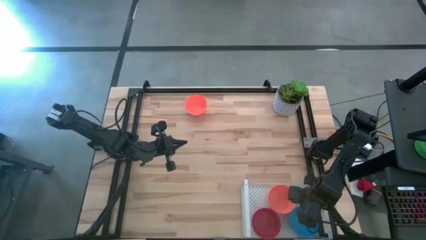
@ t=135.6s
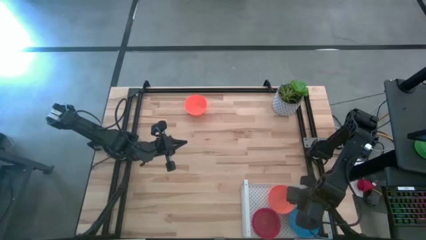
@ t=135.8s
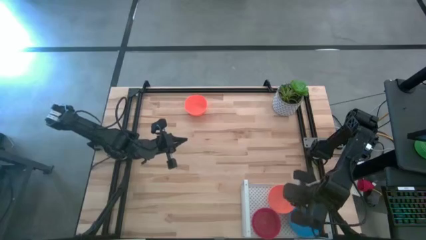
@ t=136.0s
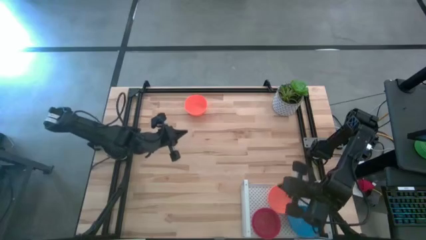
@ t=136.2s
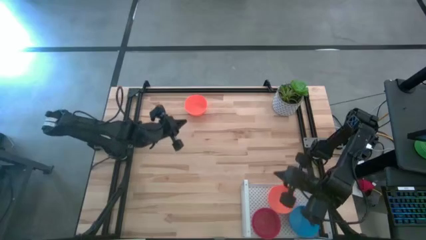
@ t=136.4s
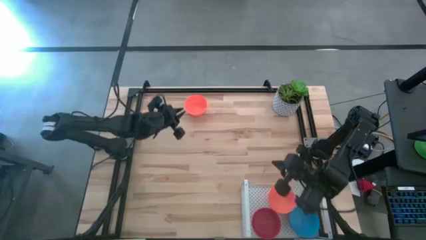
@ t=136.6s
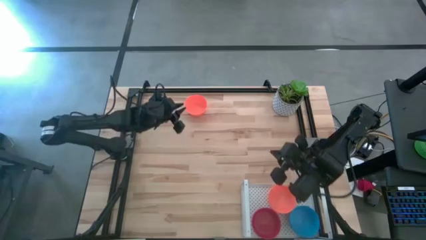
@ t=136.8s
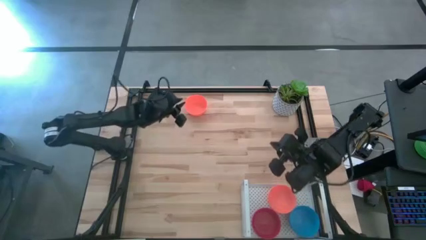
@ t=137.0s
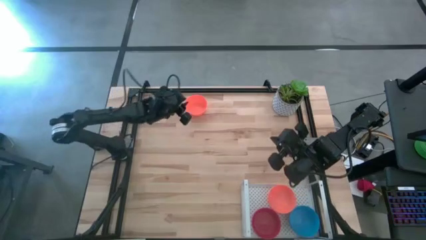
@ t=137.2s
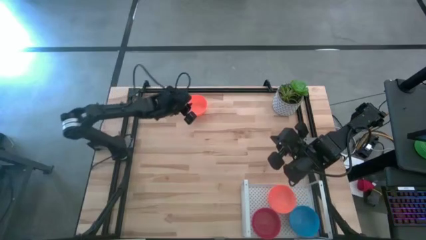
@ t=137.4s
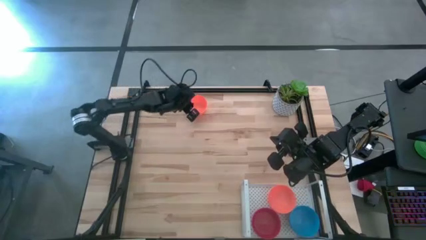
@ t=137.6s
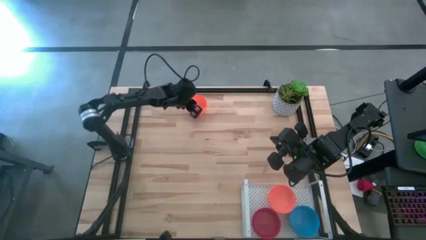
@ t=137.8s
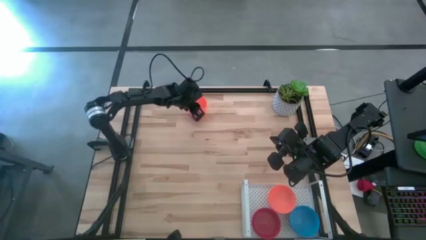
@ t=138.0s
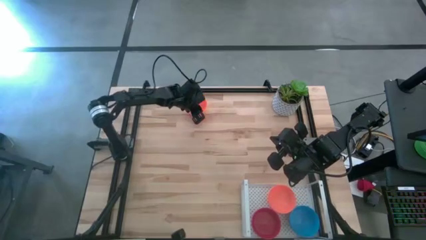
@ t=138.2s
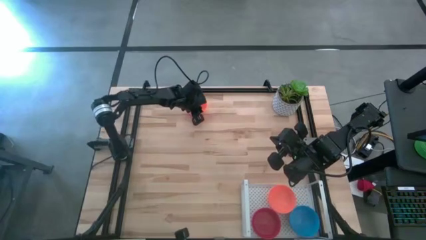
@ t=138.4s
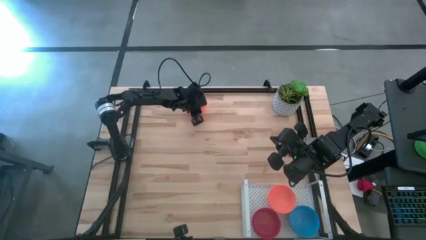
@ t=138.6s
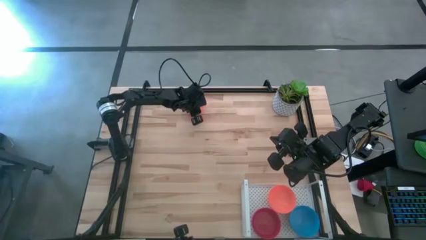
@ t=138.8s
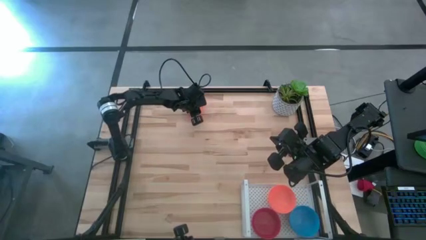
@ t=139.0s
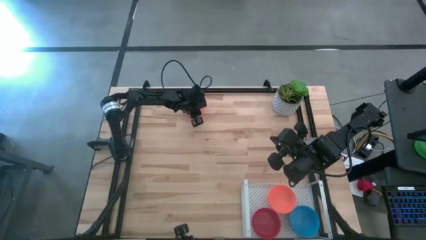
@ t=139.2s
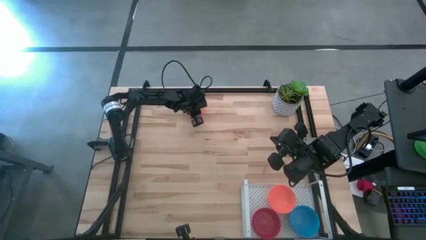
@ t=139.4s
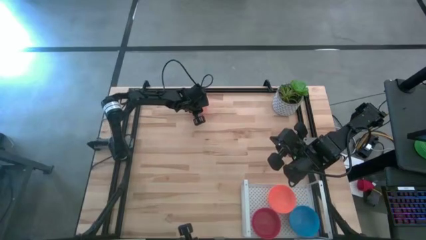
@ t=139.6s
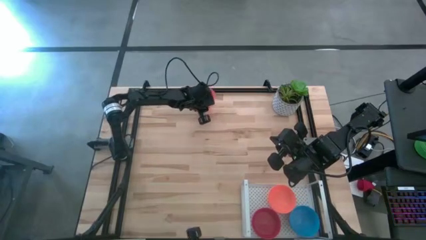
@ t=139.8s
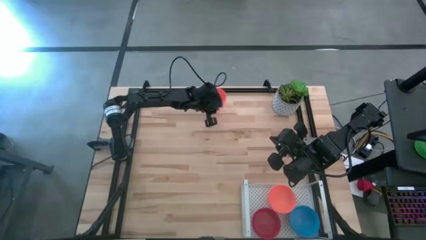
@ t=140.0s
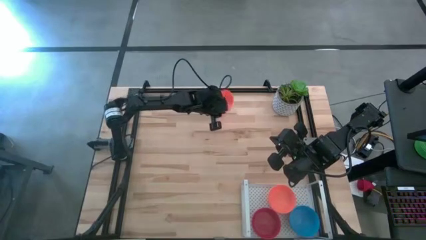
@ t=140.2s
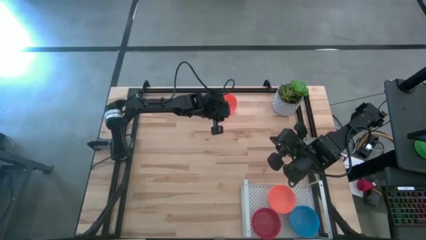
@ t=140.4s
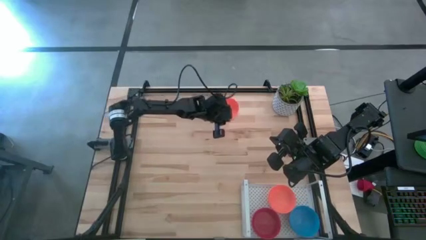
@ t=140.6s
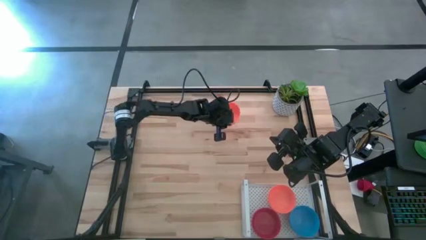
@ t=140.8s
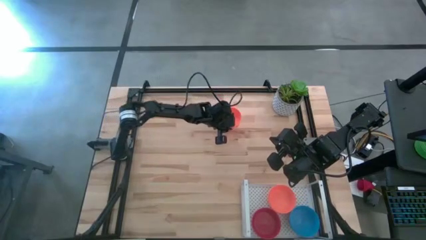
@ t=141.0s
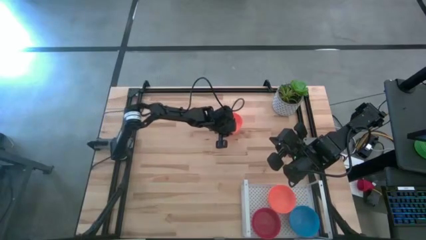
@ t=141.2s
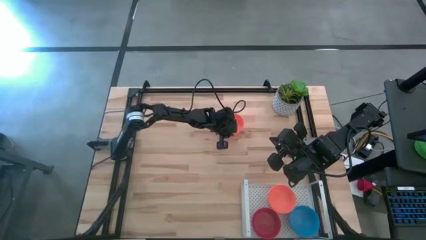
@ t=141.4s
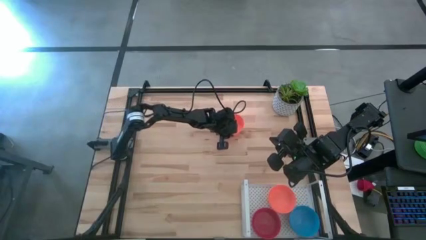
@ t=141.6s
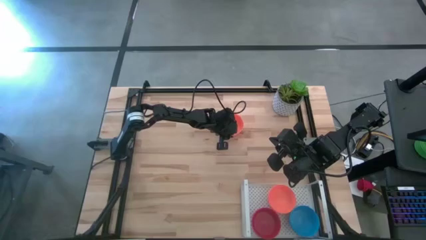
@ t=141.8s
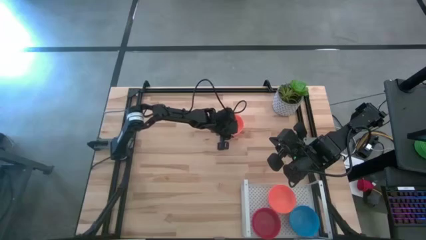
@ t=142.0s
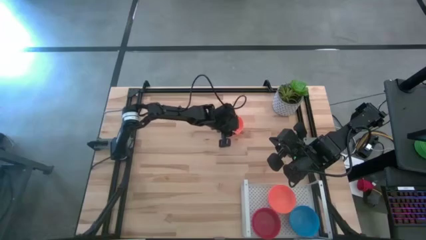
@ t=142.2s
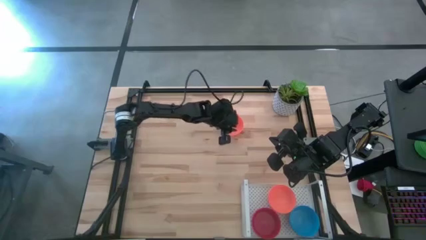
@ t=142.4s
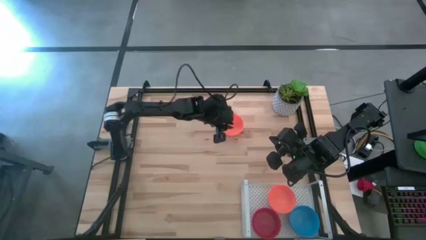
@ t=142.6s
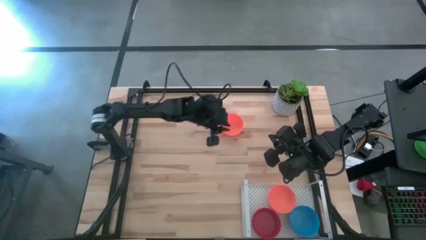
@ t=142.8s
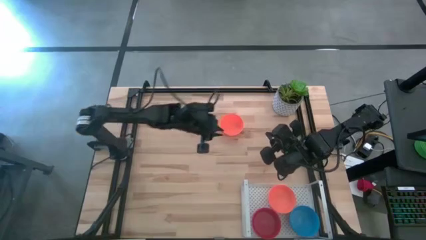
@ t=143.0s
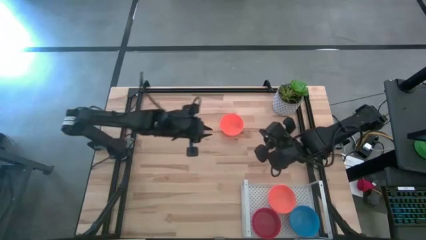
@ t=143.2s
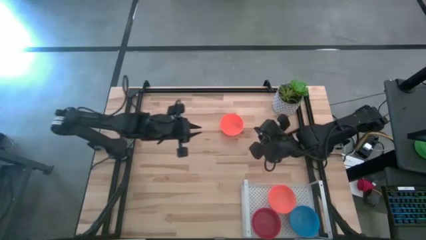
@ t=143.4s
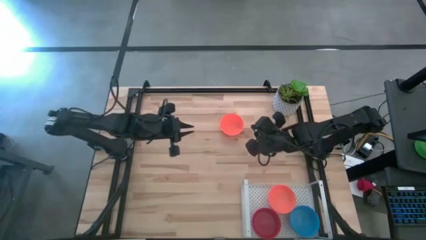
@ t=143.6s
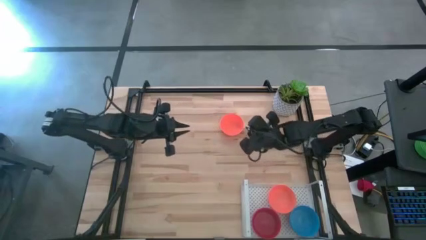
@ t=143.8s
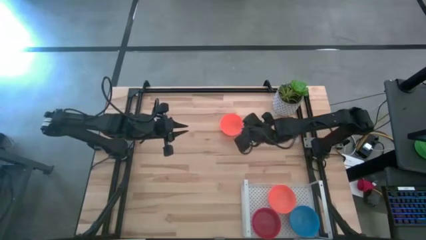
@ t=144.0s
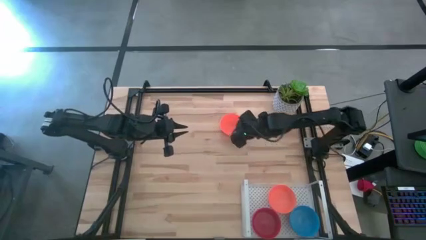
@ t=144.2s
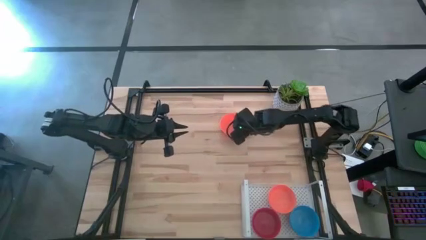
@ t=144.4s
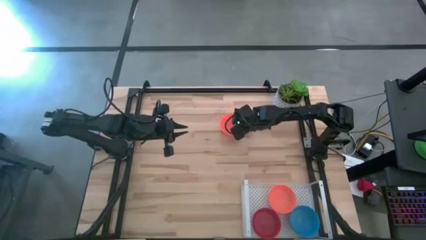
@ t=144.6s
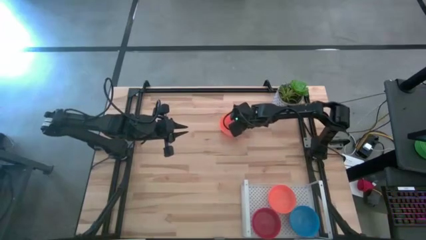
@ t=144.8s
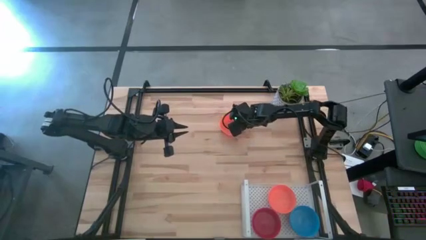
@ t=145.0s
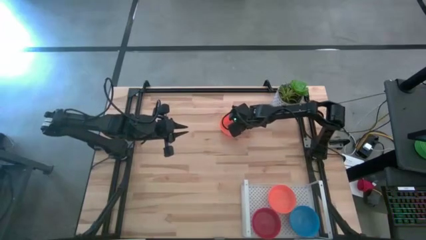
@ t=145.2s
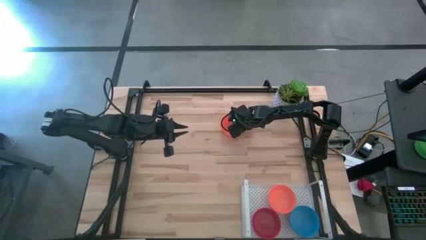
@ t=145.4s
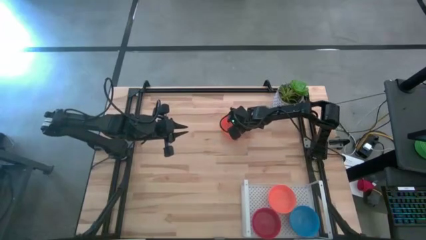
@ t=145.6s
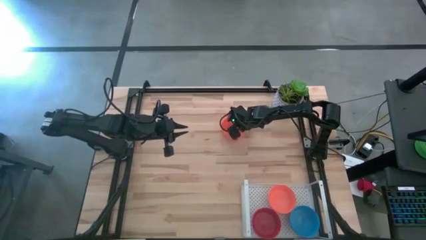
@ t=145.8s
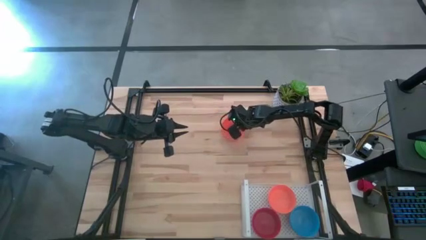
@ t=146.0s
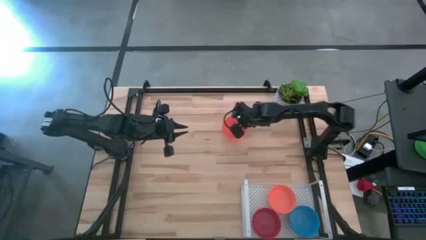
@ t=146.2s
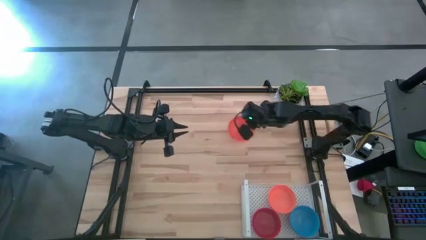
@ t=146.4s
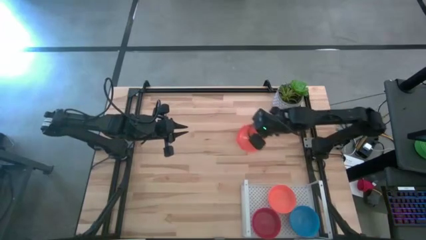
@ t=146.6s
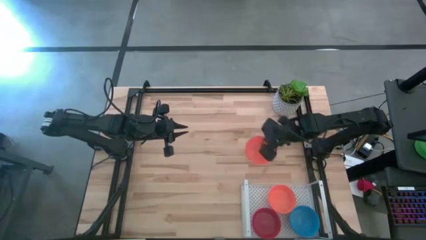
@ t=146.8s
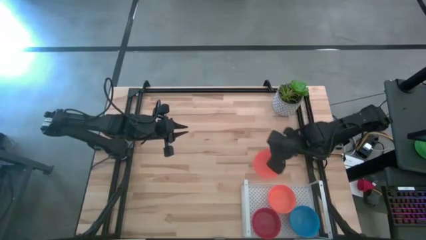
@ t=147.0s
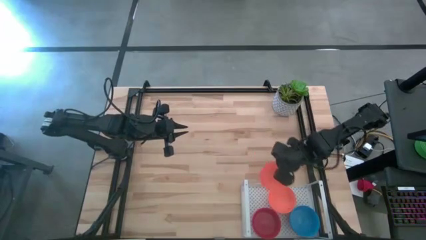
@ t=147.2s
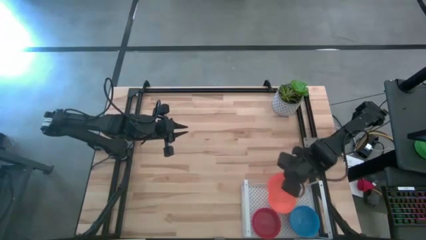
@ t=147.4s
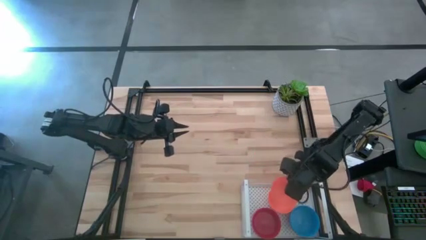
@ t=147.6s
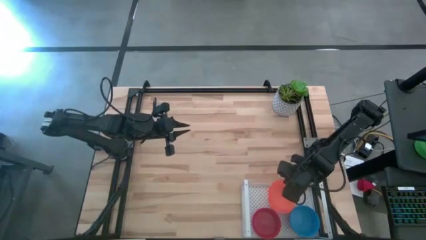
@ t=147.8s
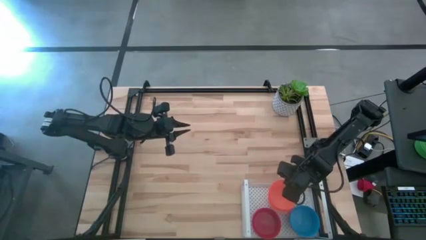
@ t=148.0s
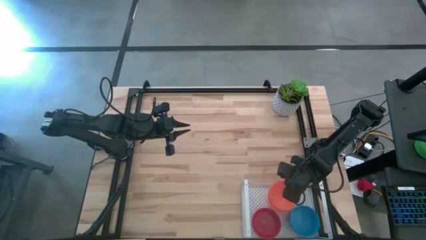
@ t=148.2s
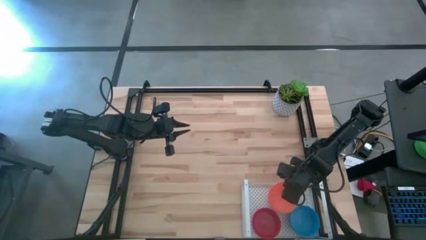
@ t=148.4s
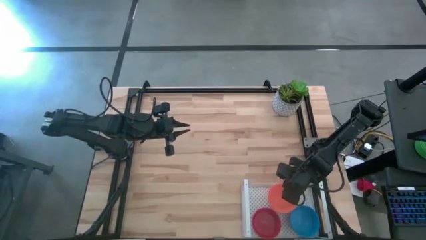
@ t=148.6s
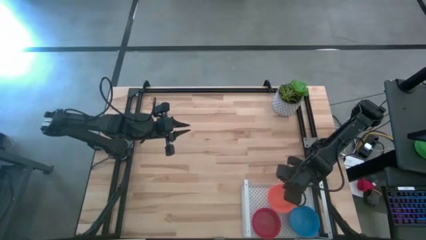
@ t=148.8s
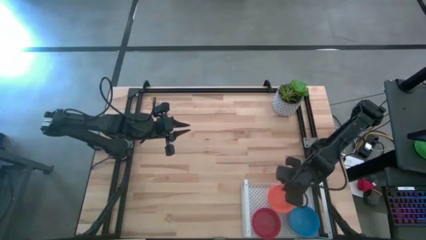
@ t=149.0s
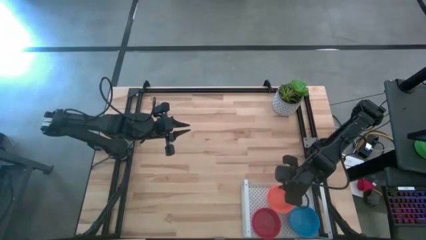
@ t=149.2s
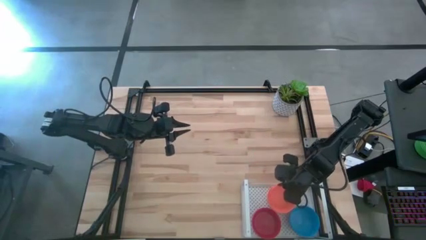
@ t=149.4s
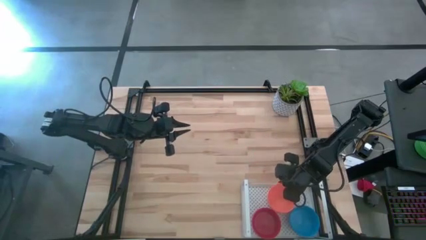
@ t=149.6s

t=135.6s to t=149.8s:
Task: Pick & Place Mini bowls
Stack the top orange bowl on top of the orange bowl on the shelf

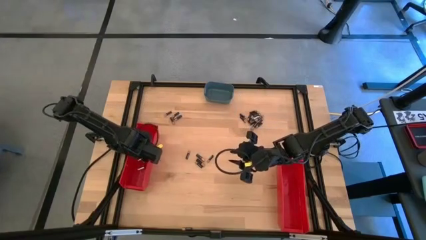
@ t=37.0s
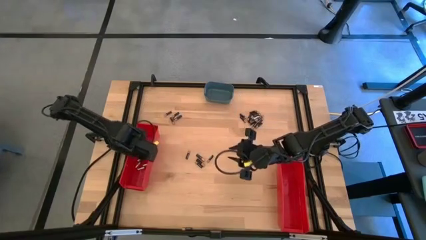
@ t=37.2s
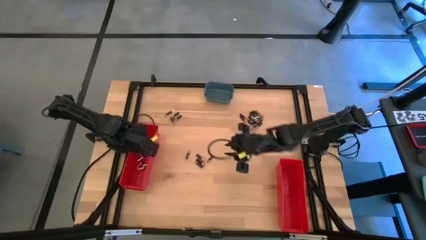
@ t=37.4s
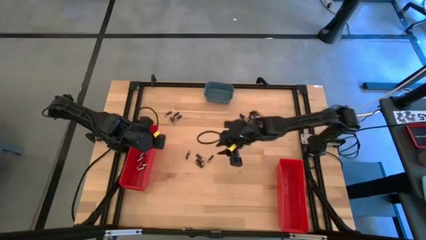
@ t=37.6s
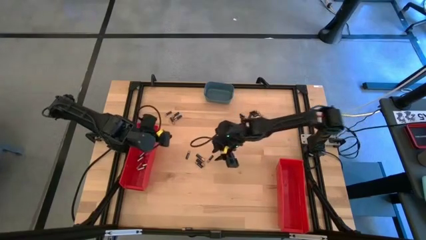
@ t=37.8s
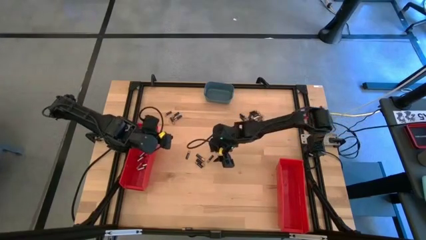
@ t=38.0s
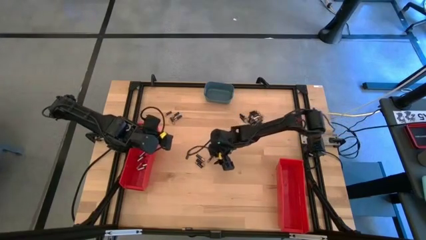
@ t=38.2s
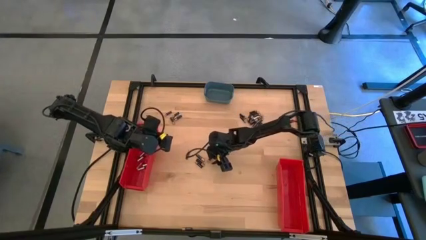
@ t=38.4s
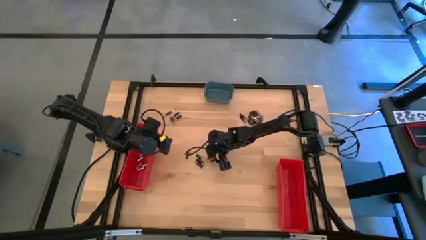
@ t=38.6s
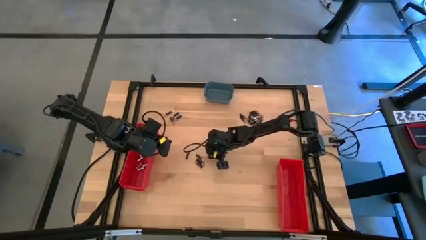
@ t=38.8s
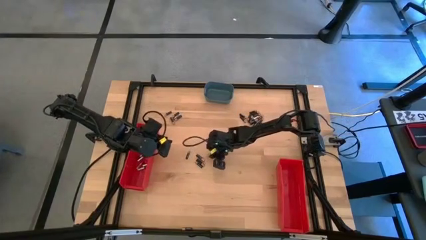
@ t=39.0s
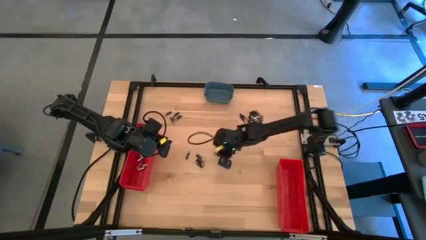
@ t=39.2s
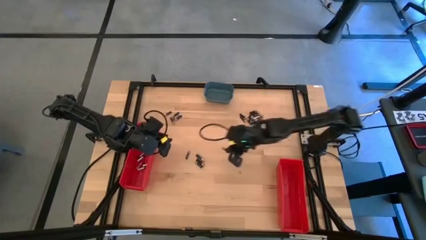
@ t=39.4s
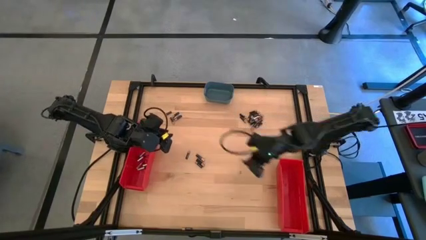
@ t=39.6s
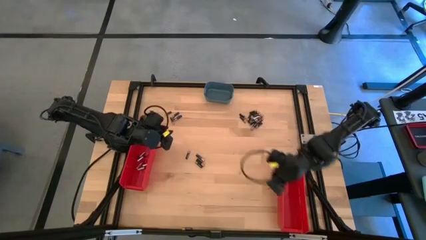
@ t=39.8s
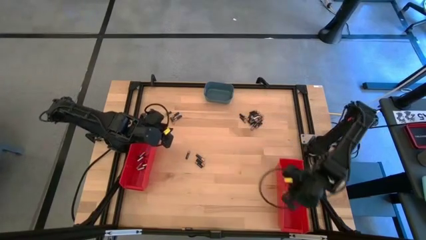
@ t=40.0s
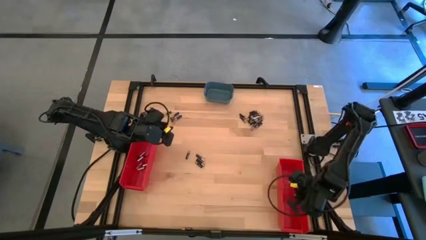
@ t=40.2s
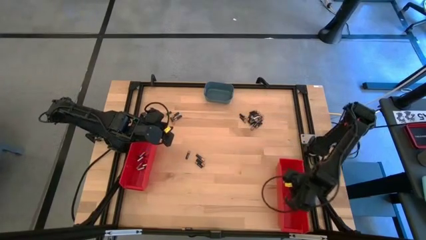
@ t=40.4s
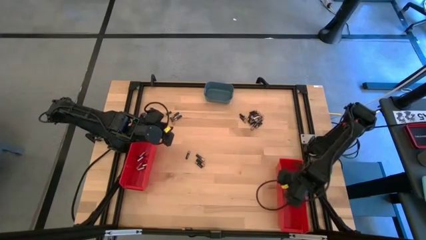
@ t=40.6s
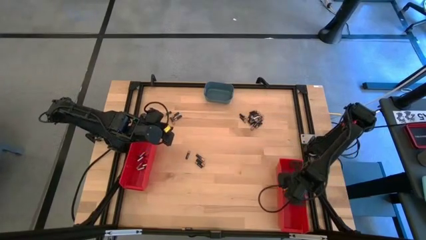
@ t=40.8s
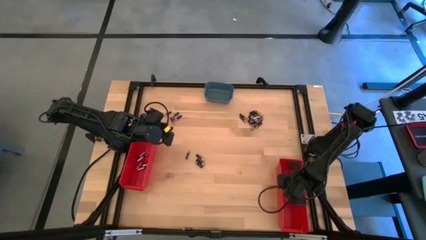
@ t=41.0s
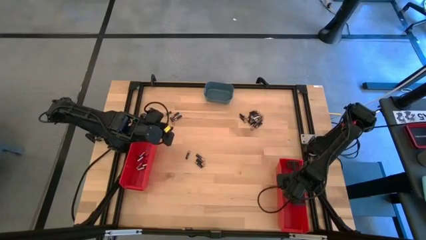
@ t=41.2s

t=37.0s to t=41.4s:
Task: Sort batteries
Put the small brown battery into the right red bin
